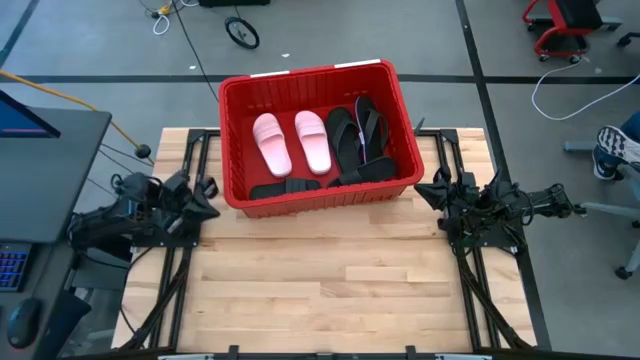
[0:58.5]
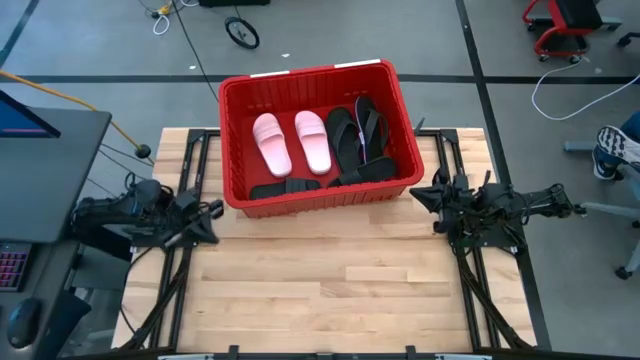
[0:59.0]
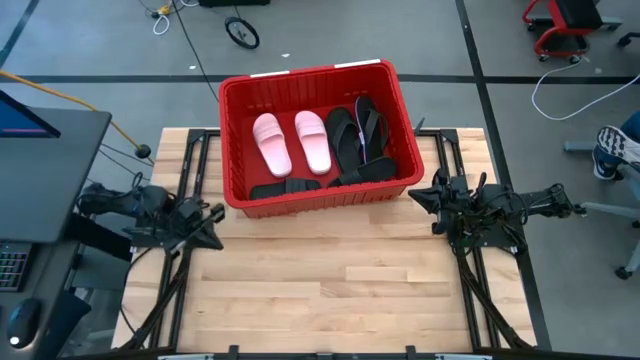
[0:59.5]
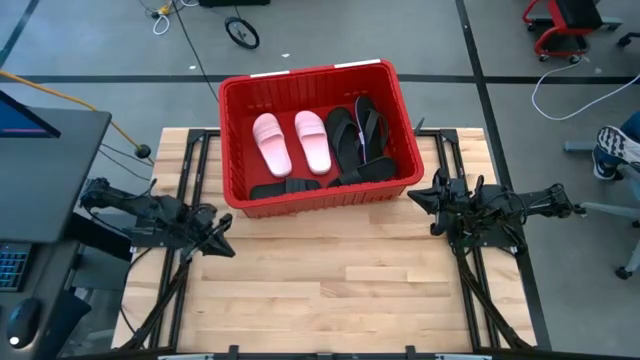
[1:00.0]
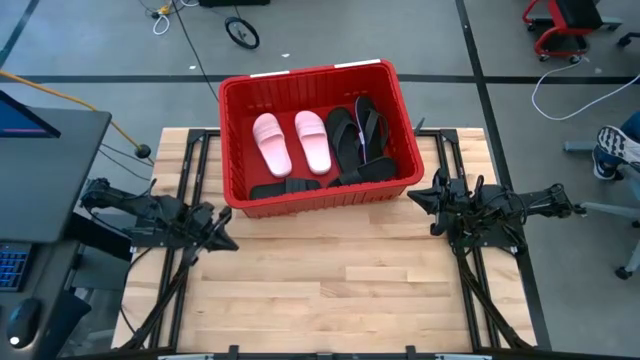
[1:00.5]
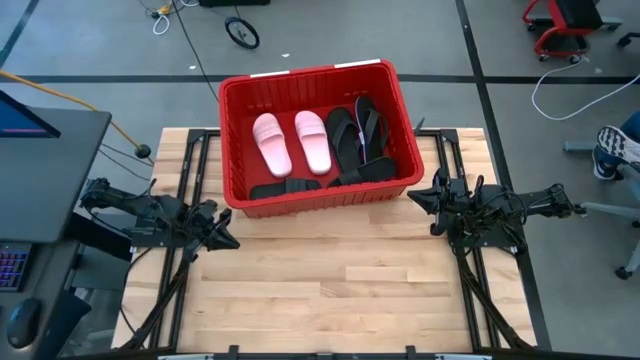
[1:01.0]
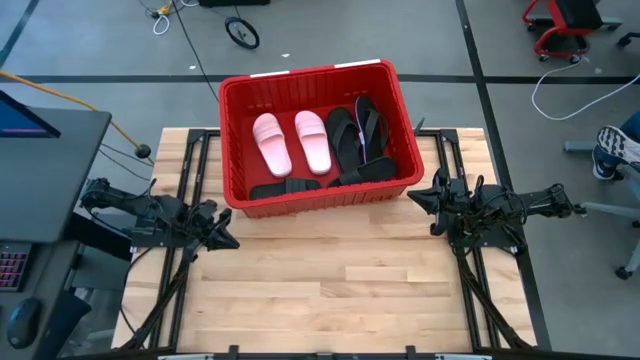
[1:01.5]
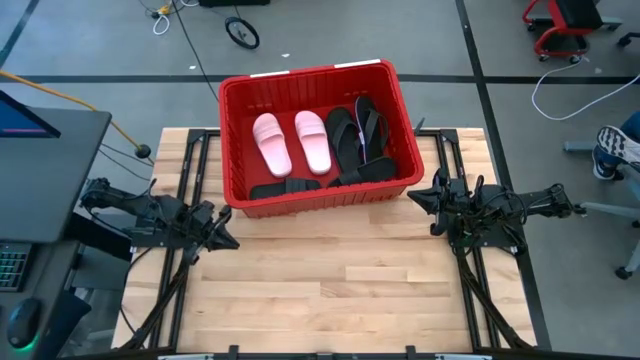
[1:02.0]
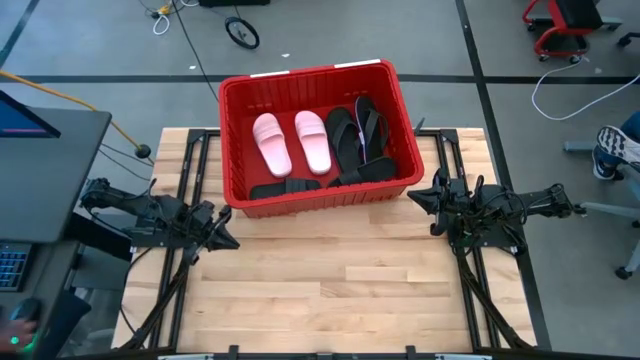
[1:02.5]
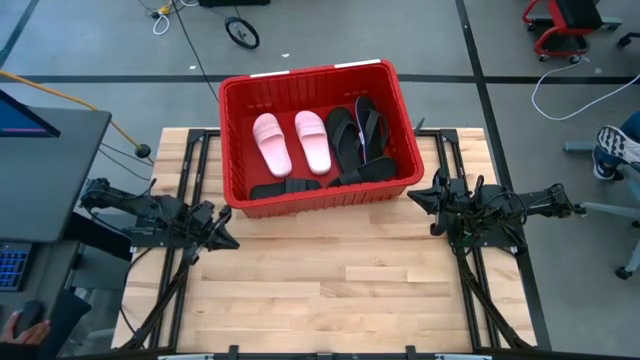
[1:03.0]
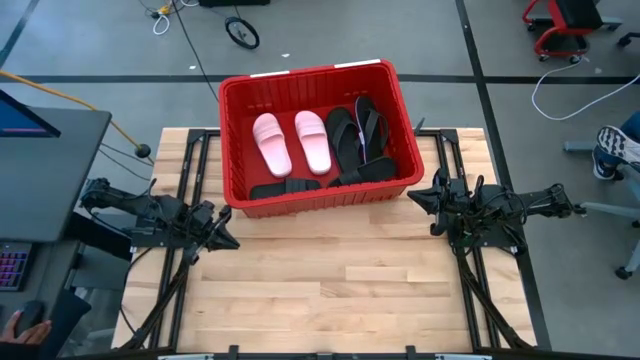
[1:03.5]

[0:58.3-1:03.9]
Task: Pick and place slides into bin
Return to Home Position

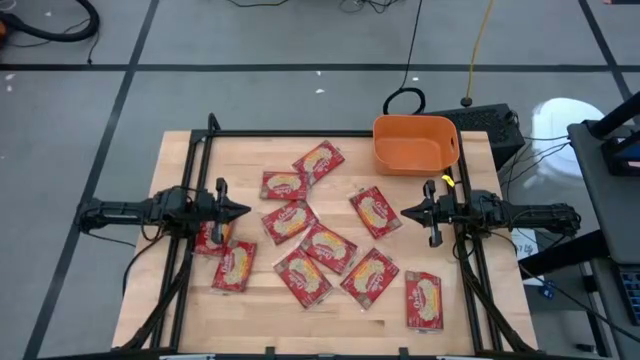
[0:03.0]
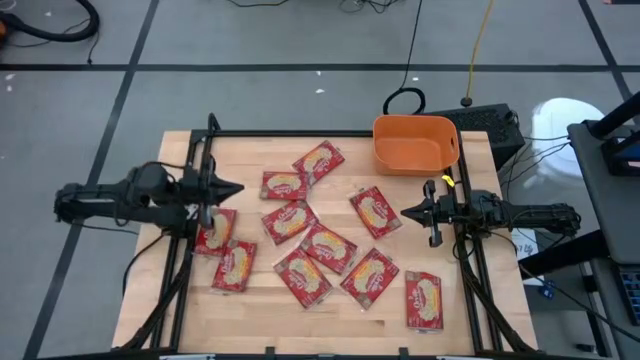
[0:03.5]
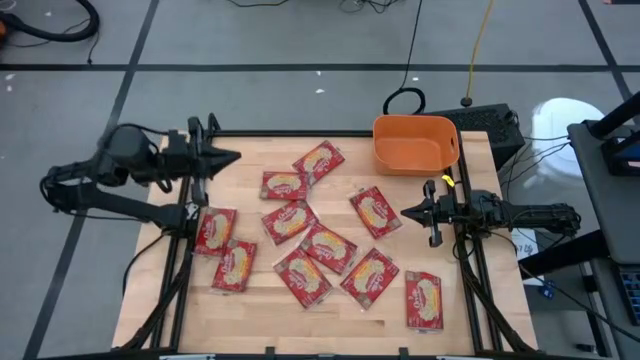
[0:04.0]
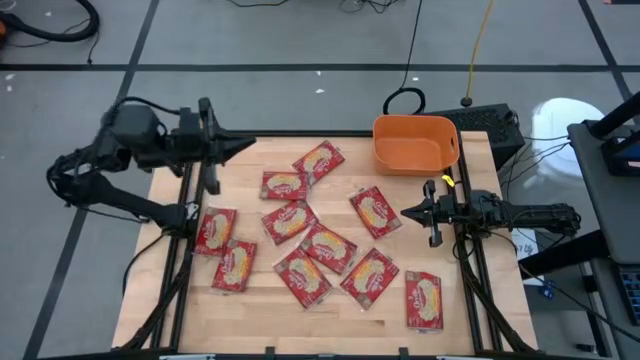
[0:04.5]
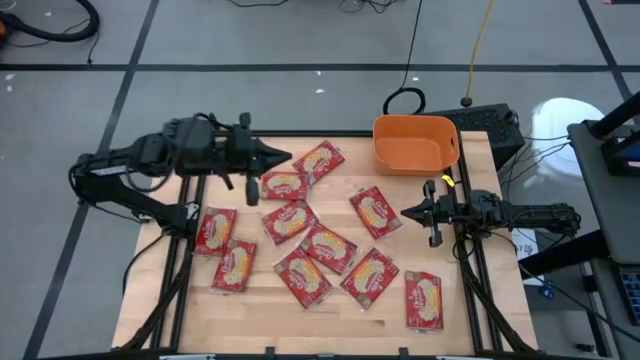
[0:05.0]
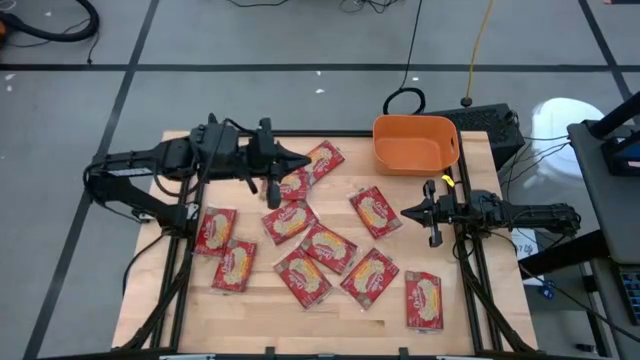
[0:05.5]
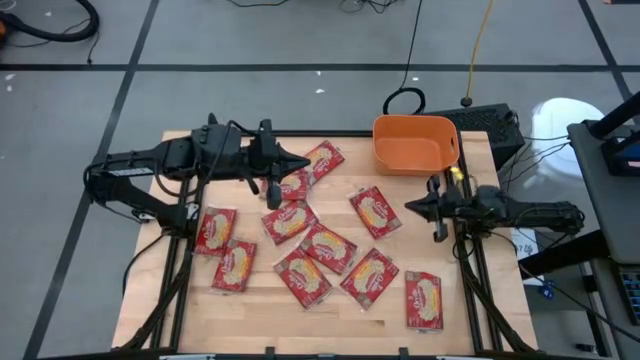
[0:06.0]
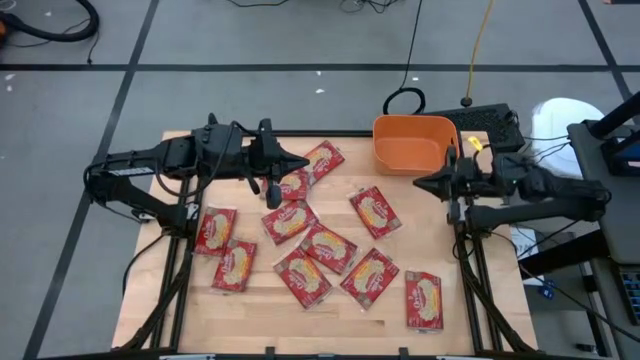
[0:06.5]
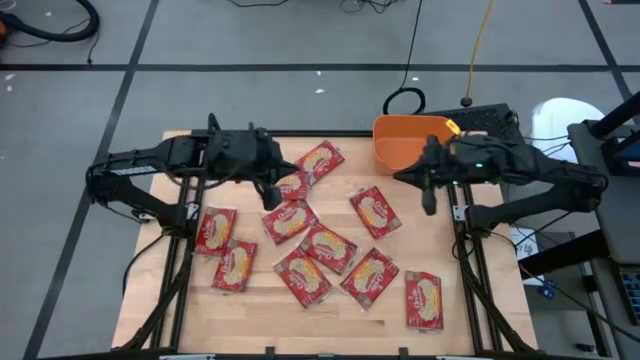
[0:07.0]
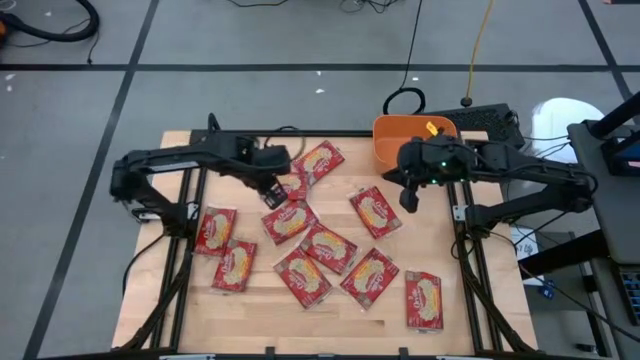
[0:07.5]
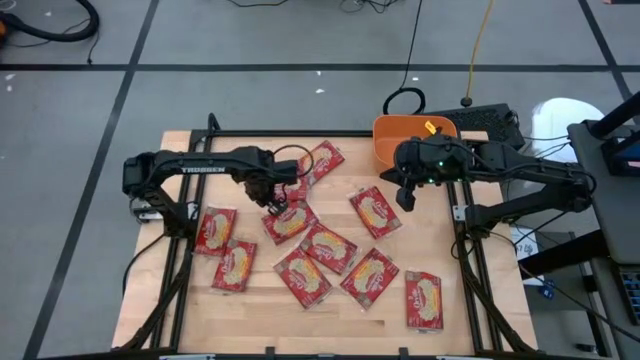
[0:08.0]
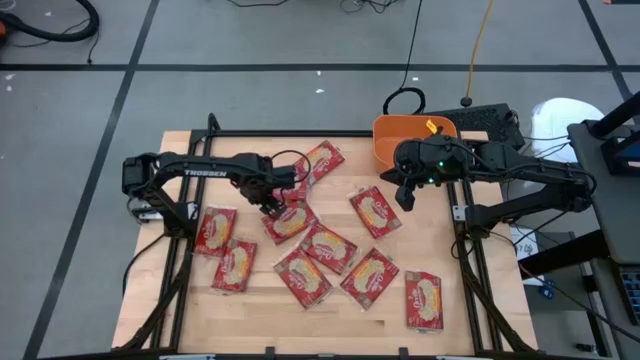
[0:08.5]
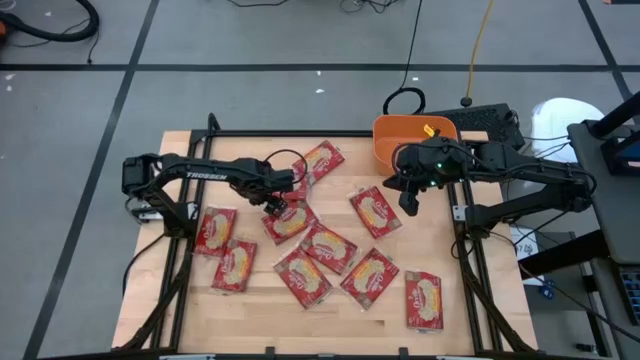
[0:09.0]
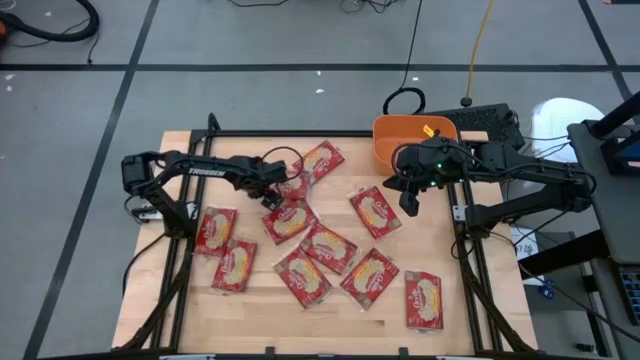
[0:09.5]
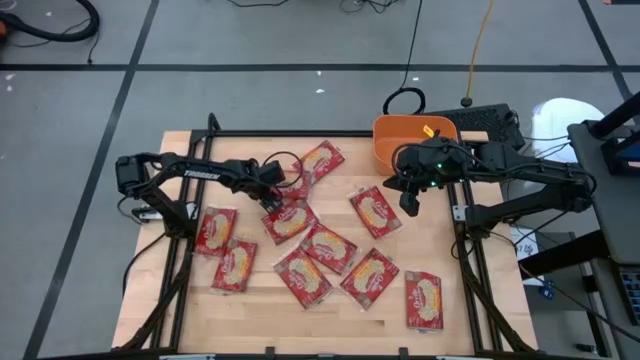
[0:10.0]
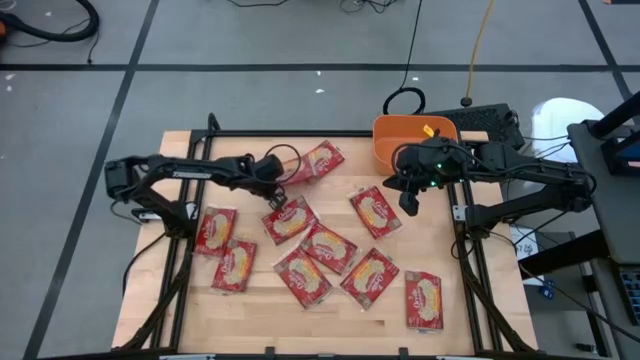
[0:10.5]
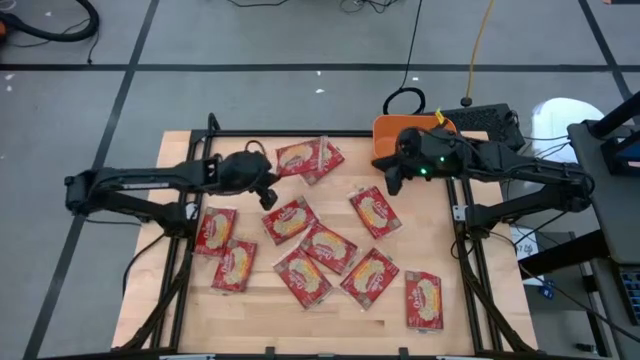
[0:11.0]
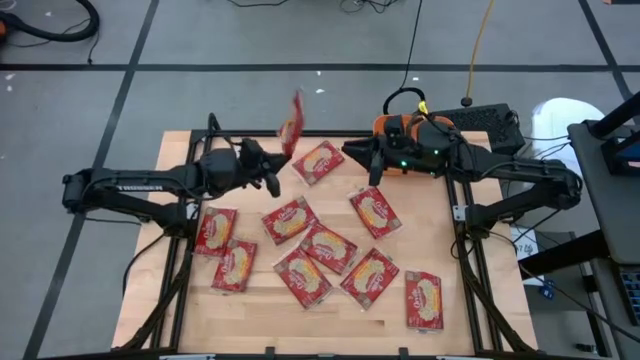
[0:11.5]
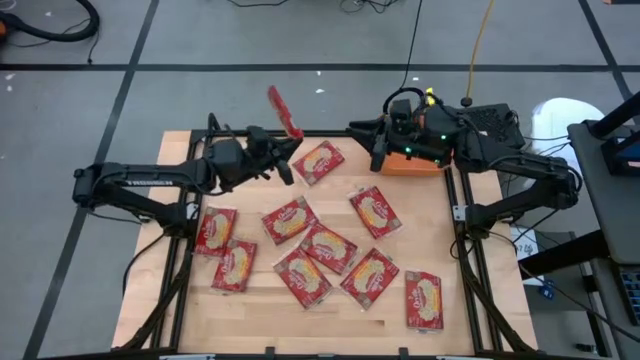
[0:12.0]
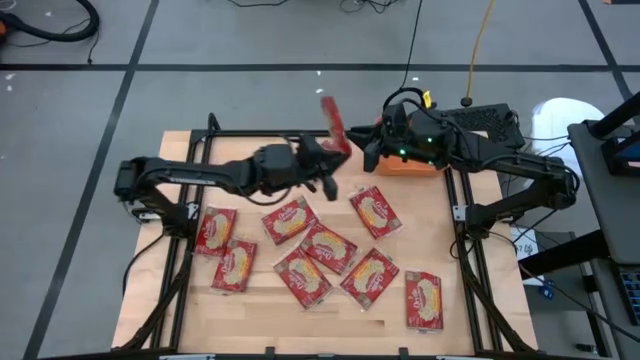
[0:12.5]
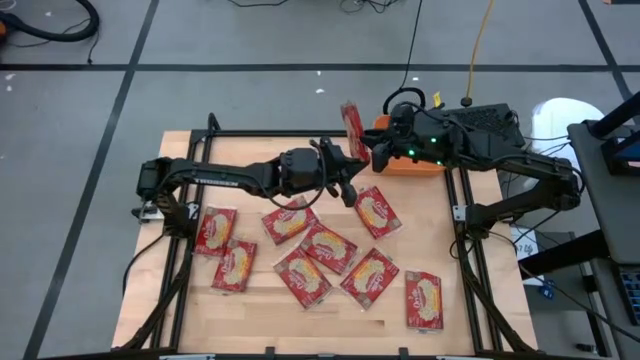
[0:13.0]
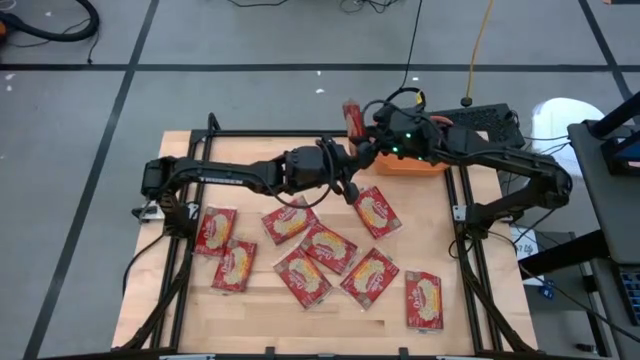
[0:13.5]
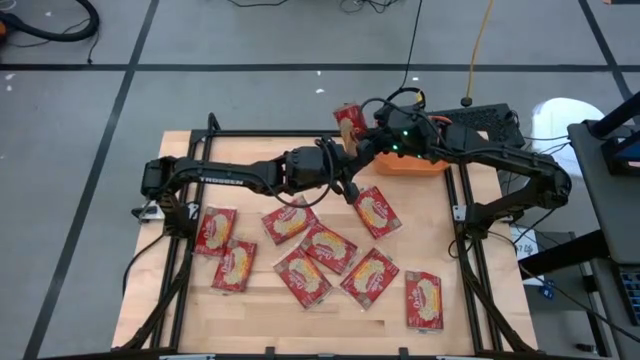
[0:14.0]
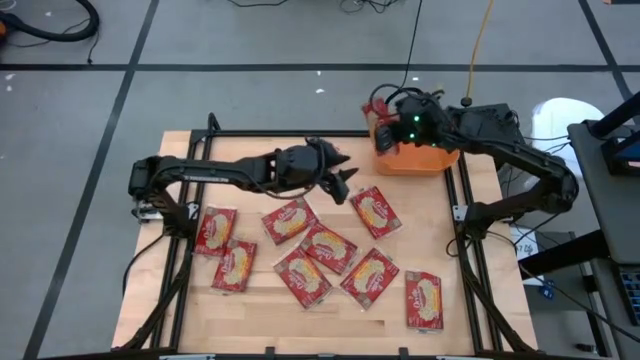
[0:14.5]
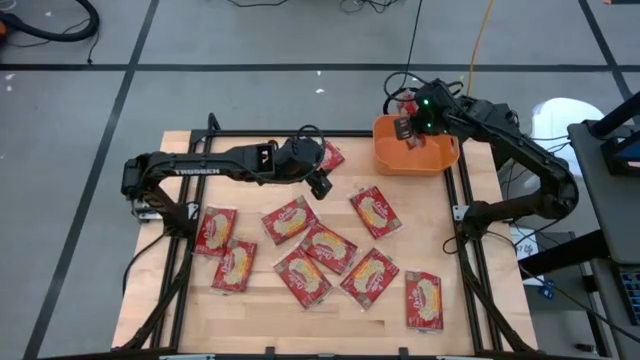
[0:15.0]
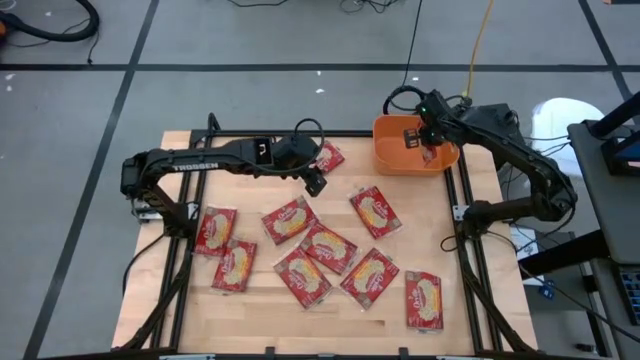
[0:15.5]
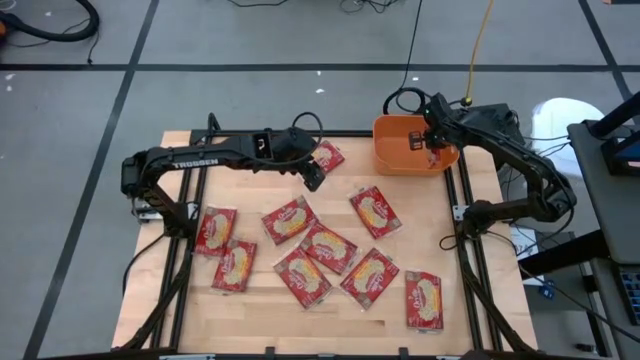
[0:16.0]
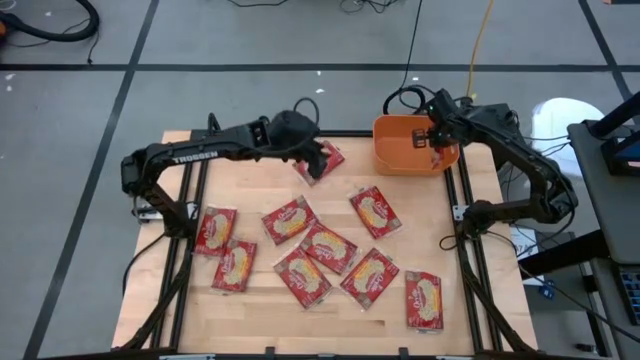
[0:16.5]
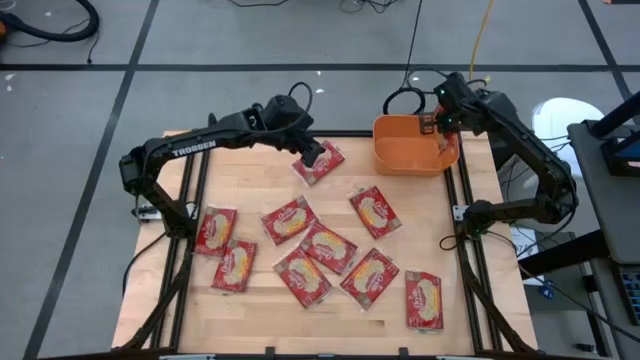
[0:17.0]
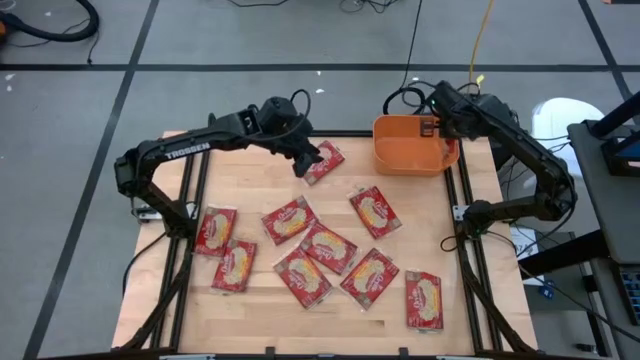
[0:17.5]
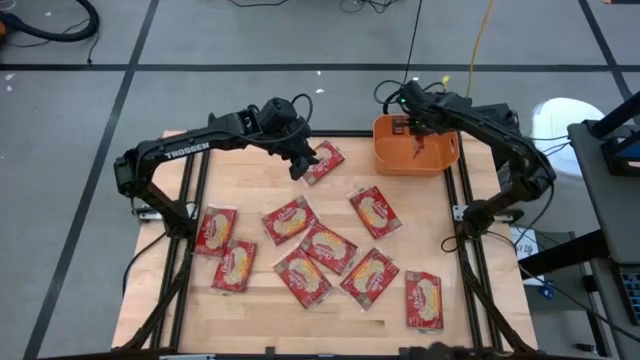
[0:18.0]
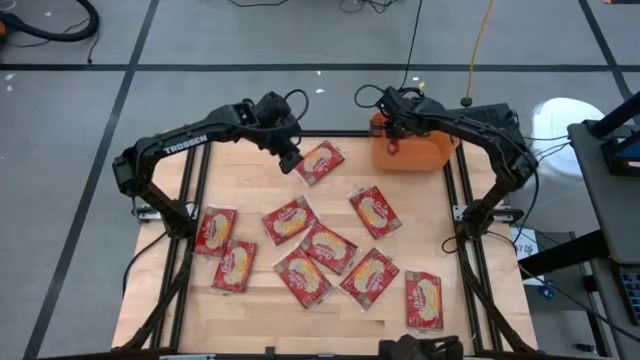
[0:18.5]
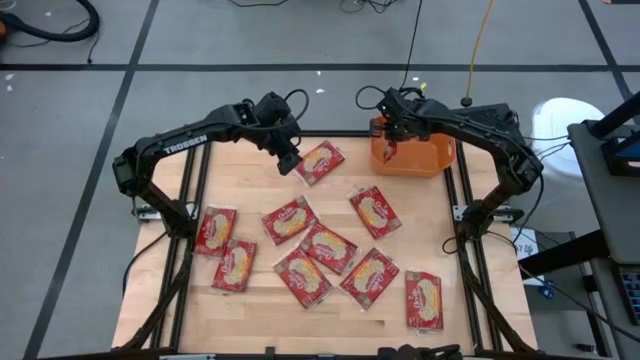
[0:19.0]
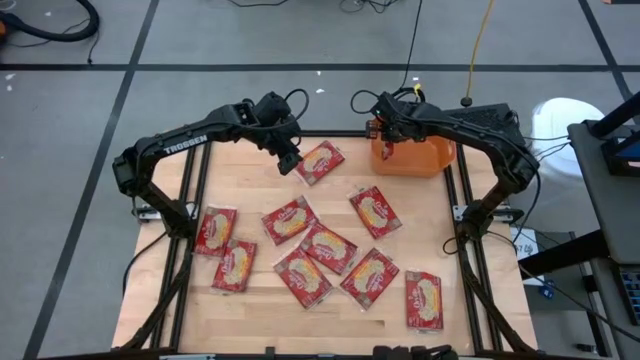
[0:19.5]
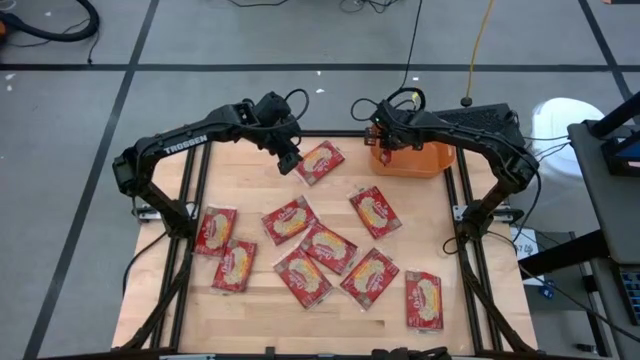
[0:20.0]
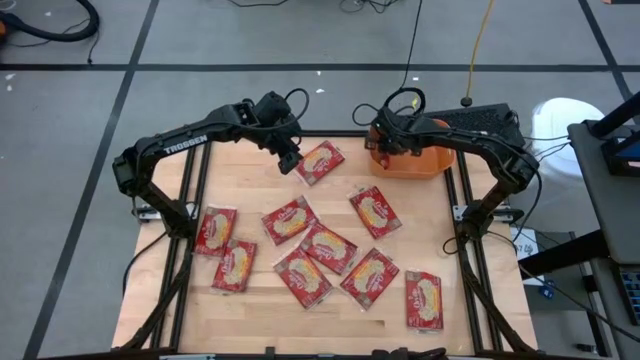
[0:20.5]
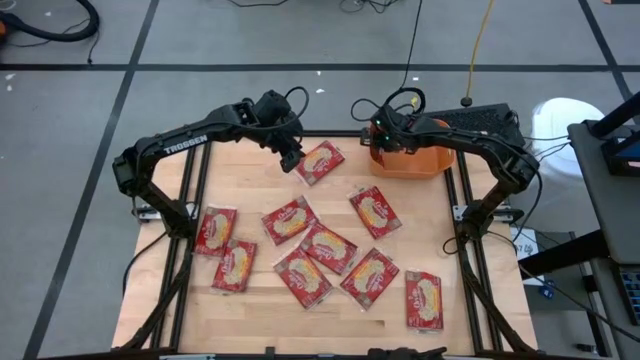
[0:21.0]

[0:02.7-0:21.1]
Task: Sort popcorn bags into baskets
Put the red popcorn bag into the orange bin
